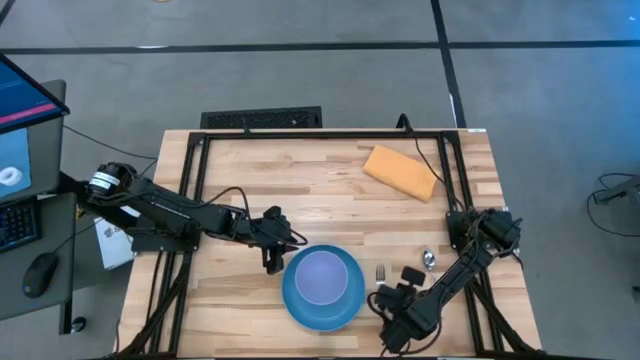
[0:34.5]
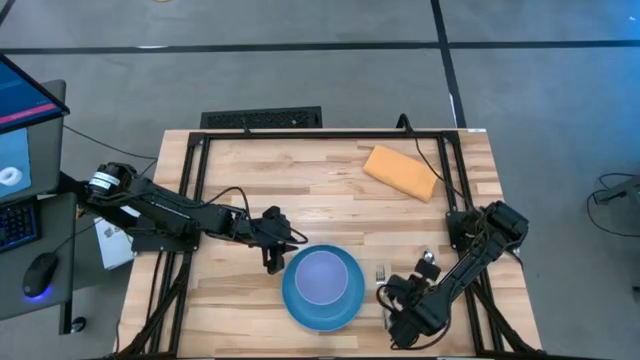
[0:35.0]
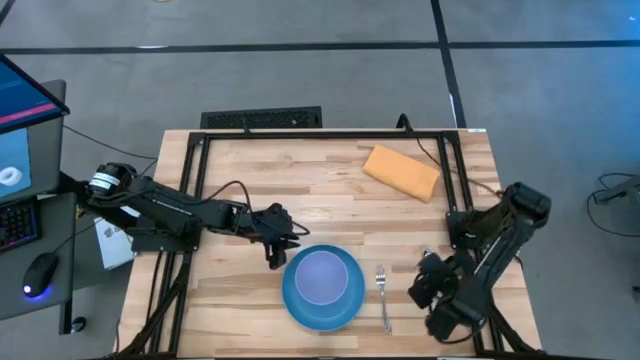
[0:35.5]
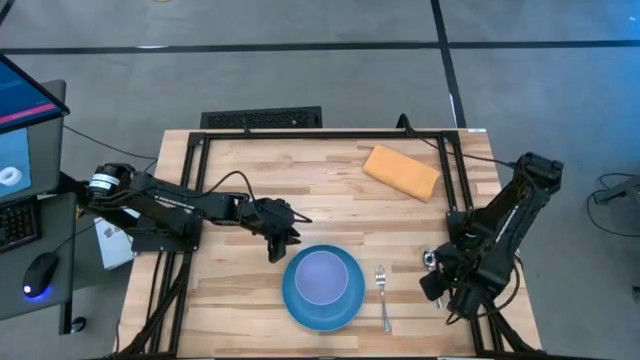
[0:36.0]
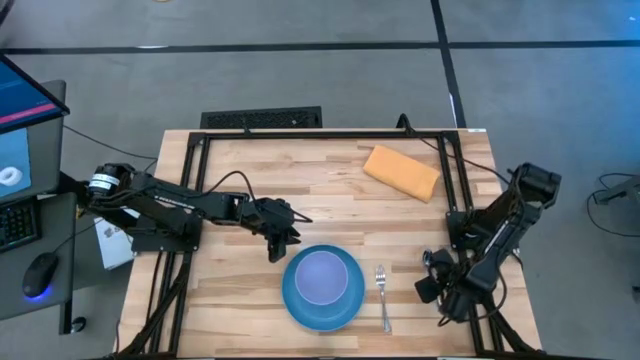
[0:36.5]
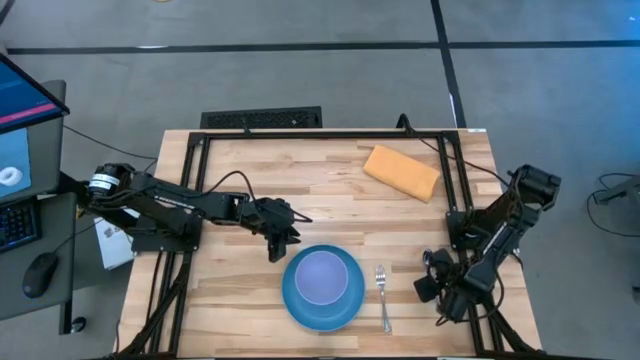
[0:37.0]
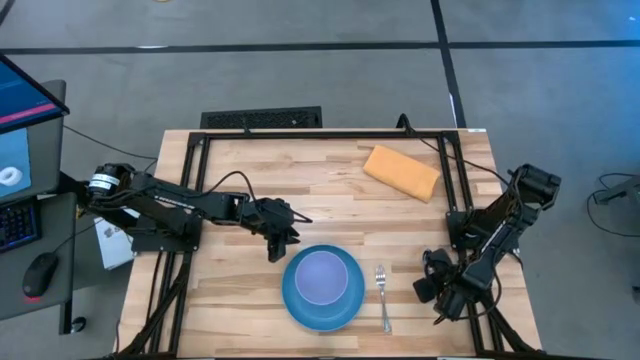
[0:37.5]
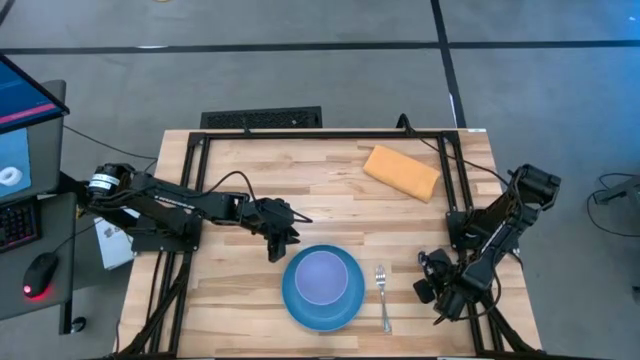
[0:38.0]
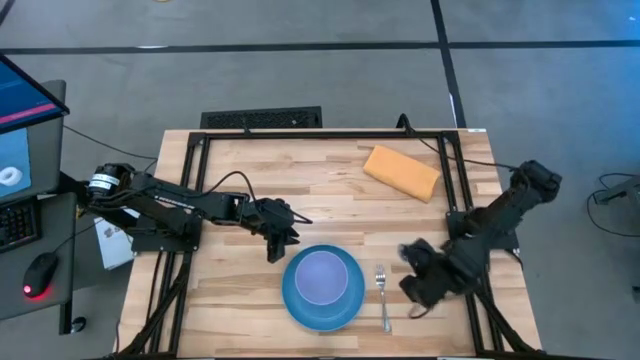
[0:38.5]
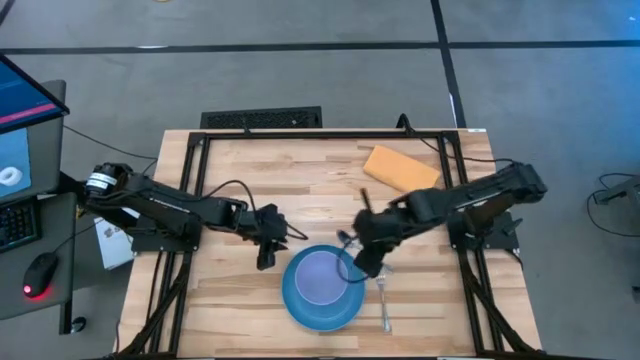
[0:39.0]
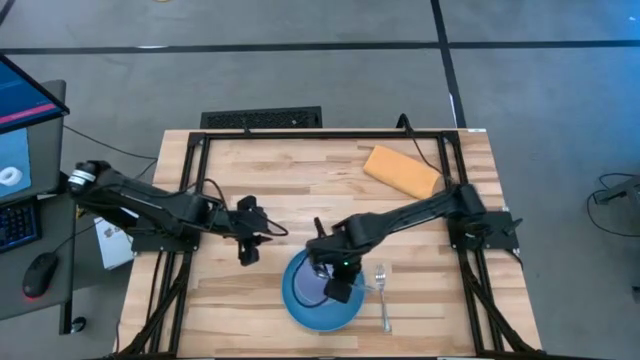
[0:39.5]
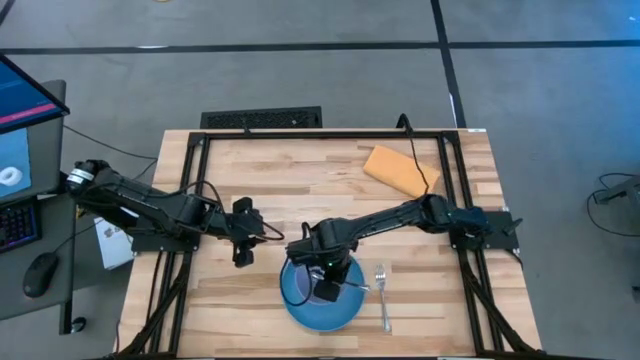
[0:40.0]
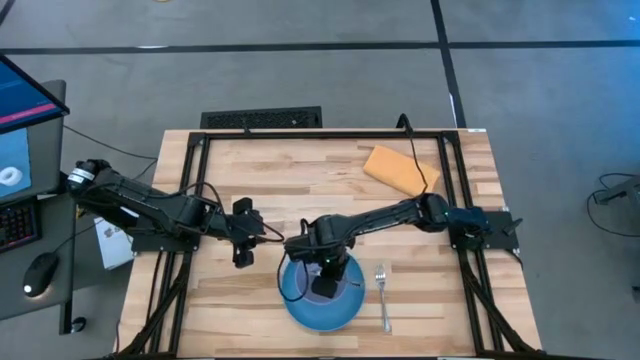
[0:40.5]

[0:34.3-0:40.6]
Task: Set table place
Put the silver spoon into the purple bowl

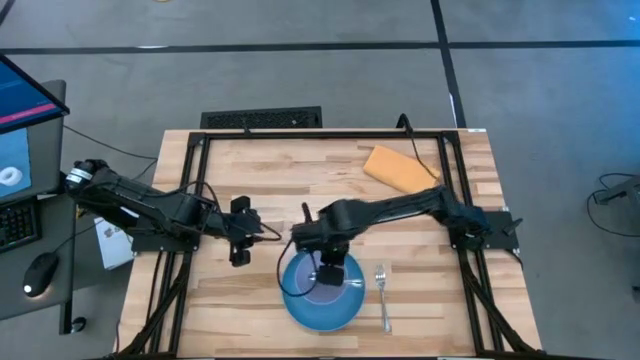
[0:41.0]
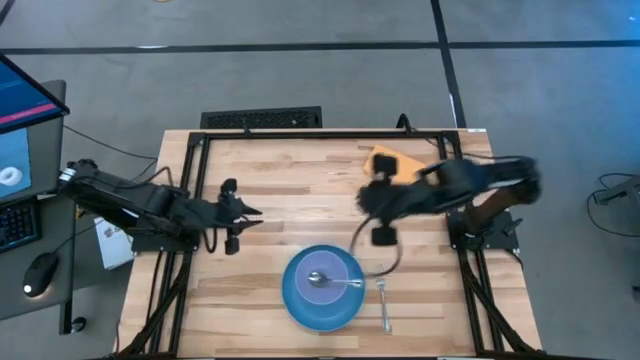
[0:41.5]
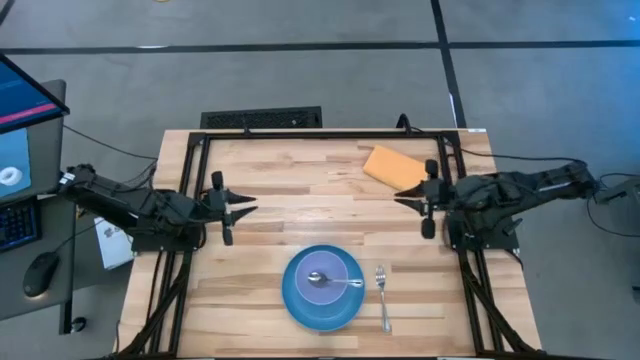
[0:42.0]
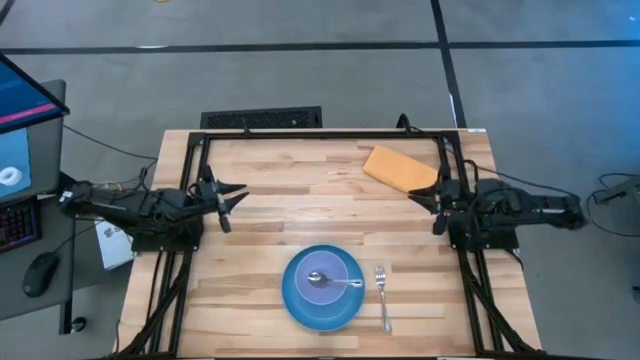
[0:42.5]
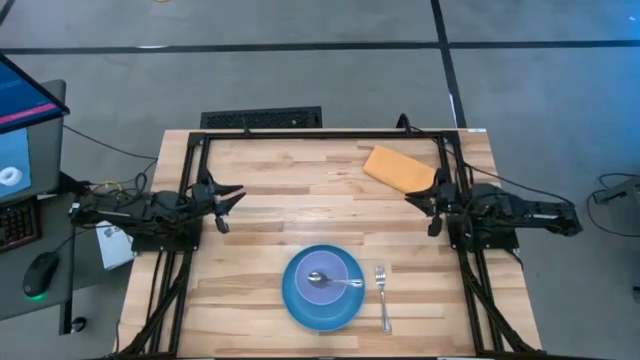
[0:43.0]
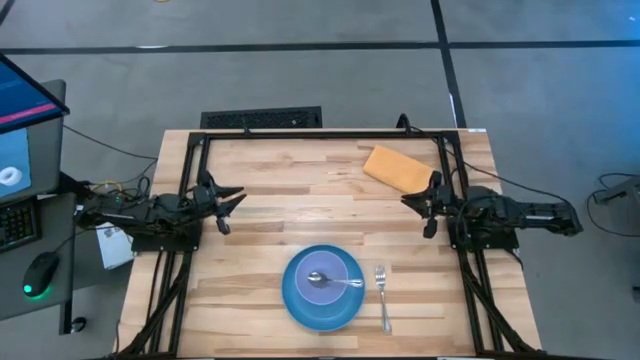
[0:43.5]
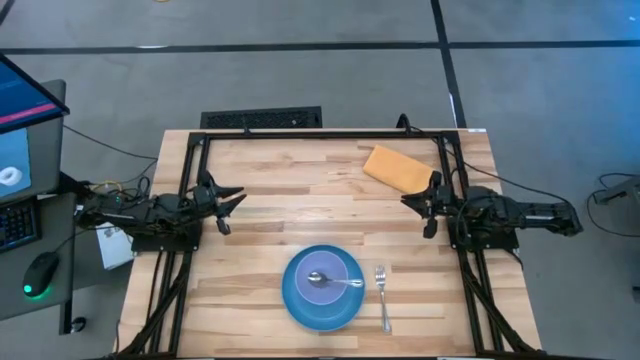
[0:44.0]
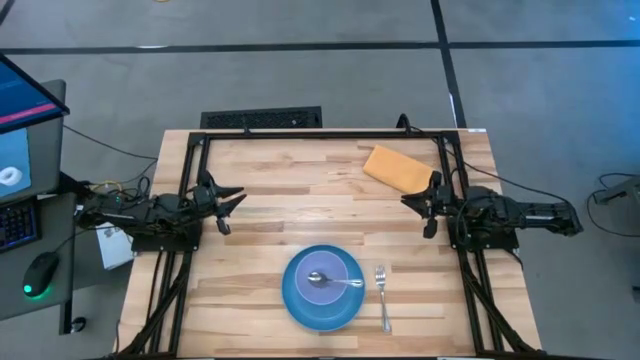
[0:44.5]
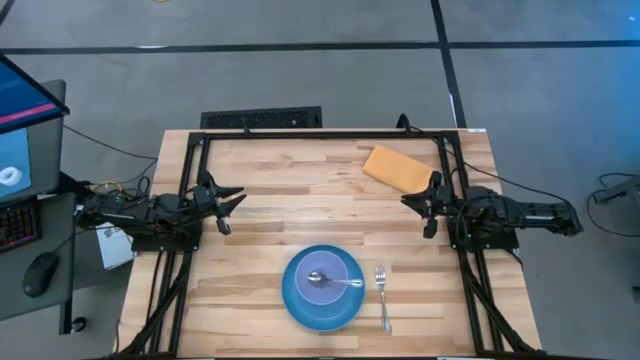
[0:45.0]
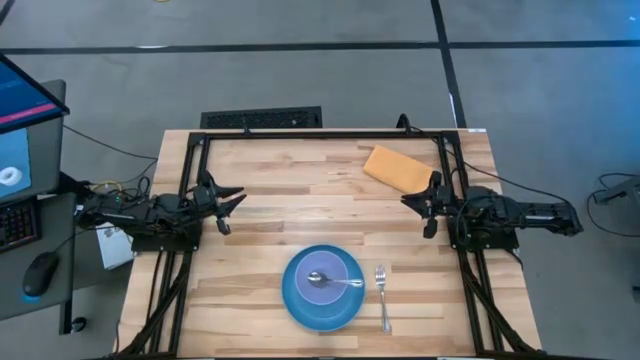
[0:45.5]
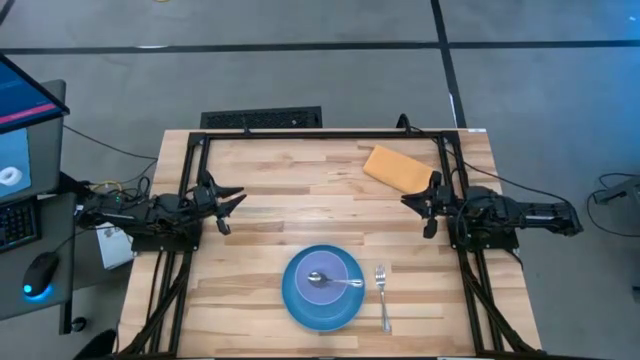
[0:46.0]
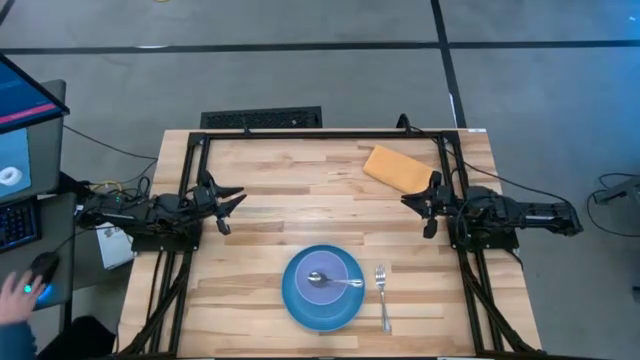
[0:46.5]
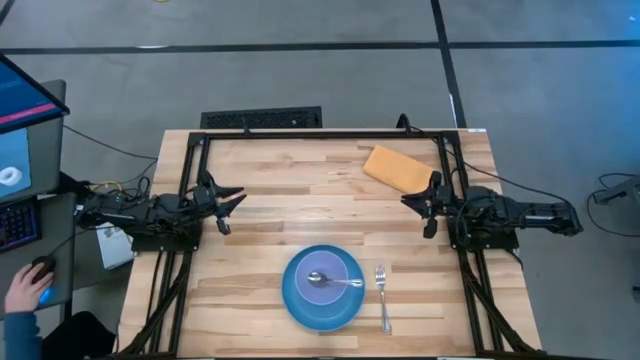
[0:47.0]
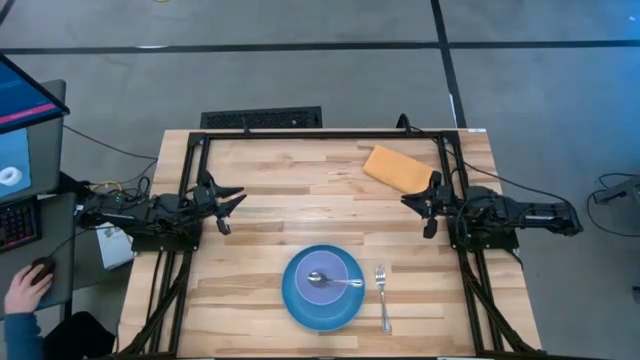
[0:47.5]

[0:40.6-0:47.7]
Return to Home Position

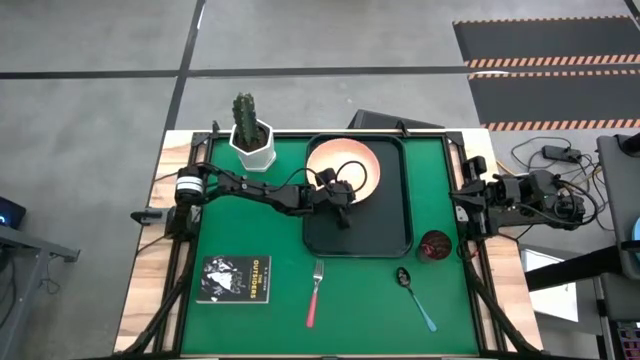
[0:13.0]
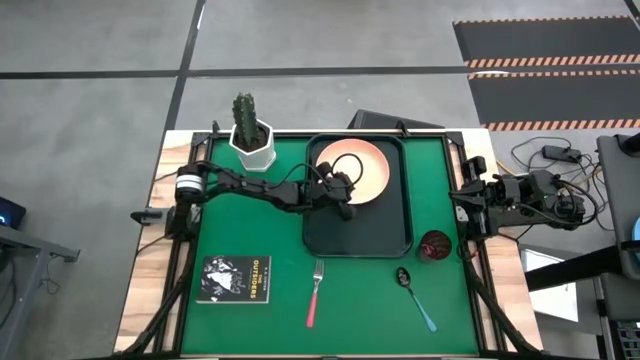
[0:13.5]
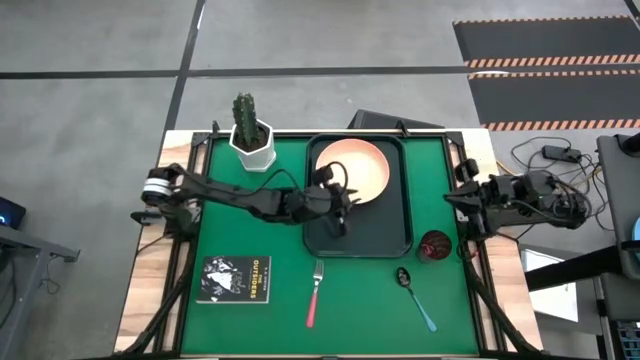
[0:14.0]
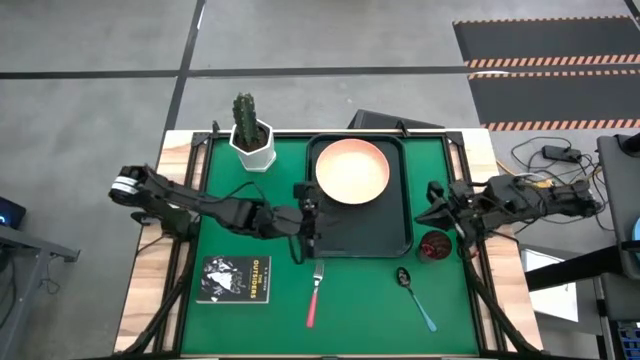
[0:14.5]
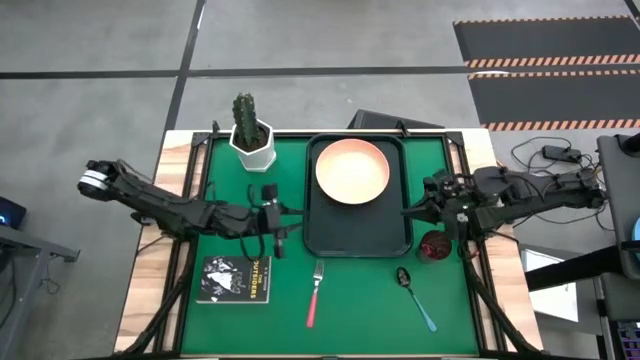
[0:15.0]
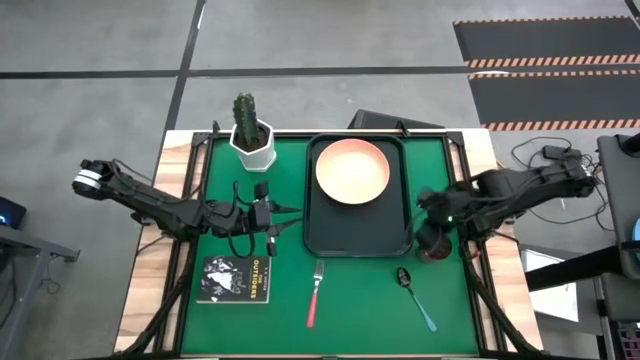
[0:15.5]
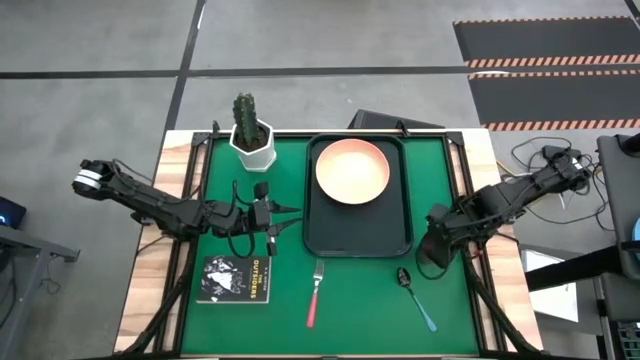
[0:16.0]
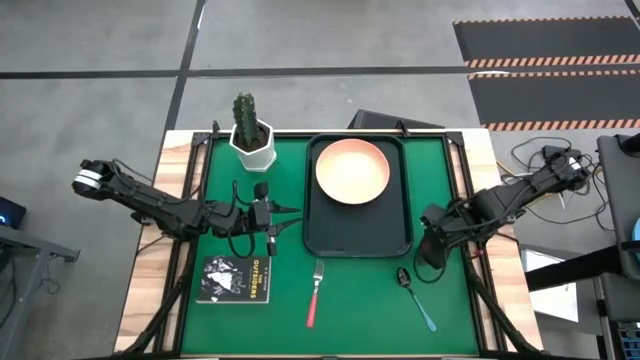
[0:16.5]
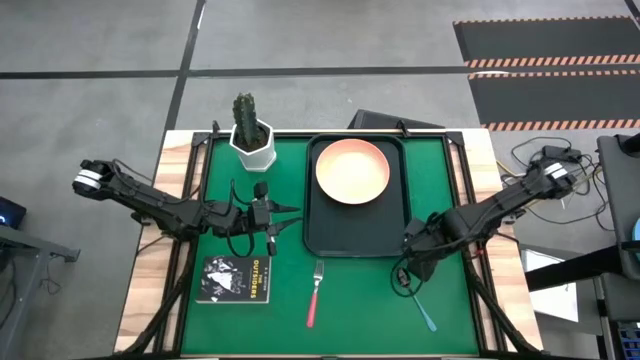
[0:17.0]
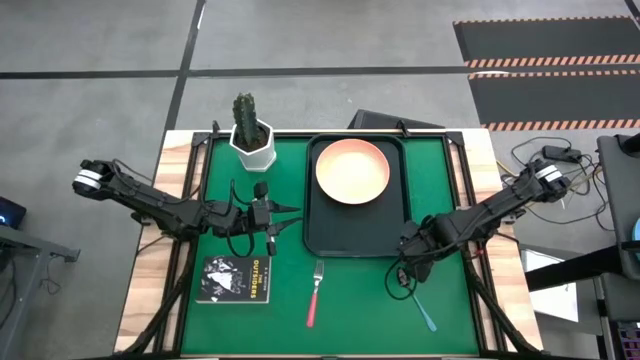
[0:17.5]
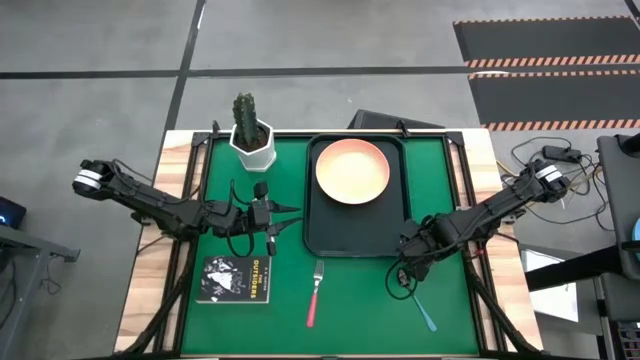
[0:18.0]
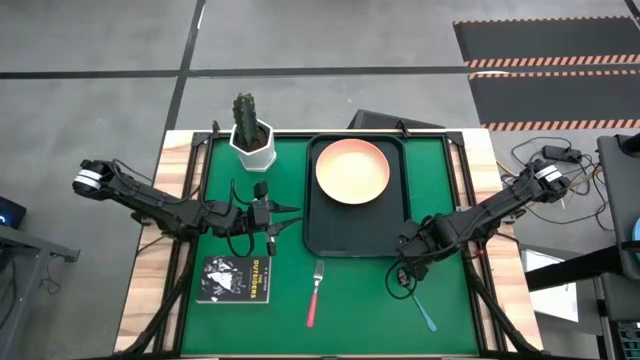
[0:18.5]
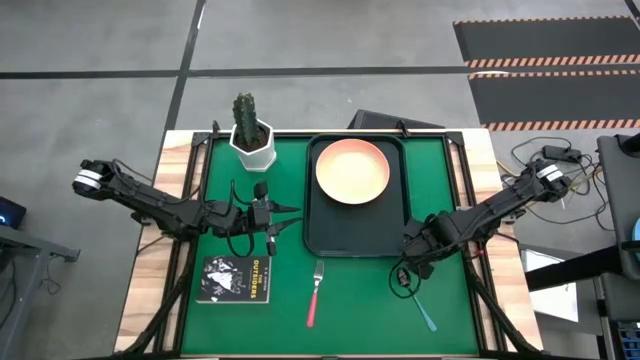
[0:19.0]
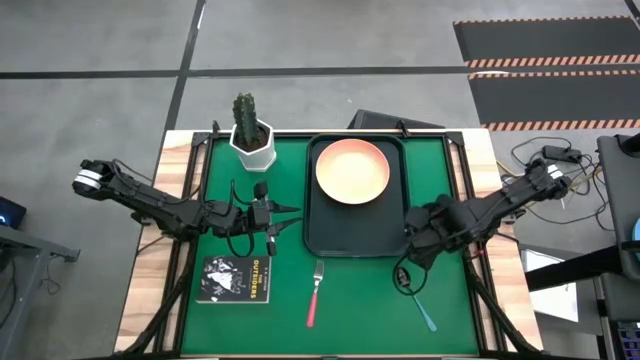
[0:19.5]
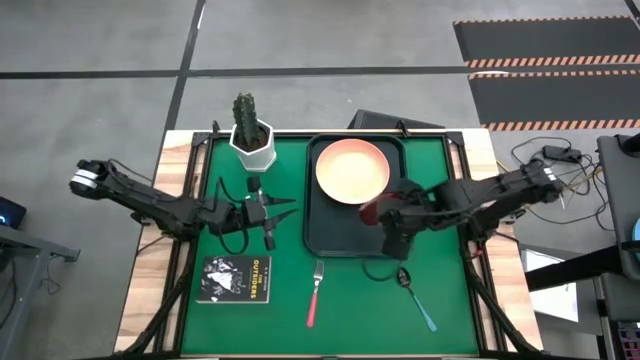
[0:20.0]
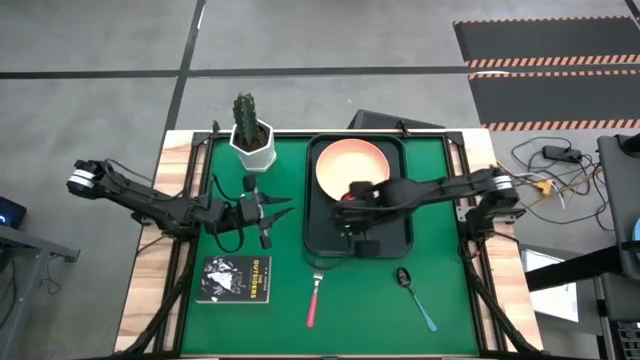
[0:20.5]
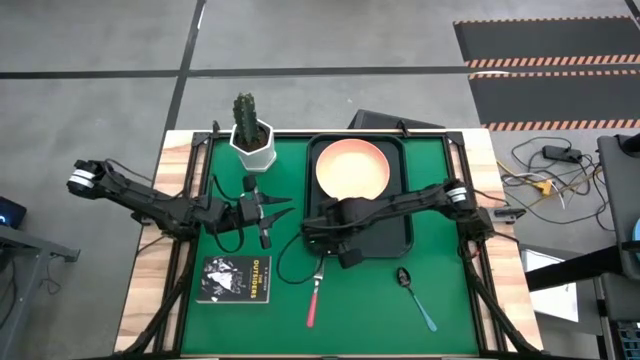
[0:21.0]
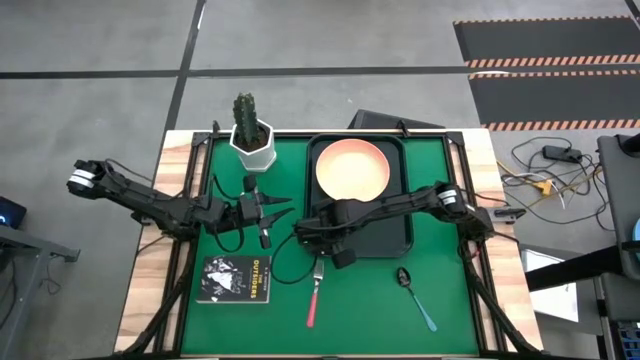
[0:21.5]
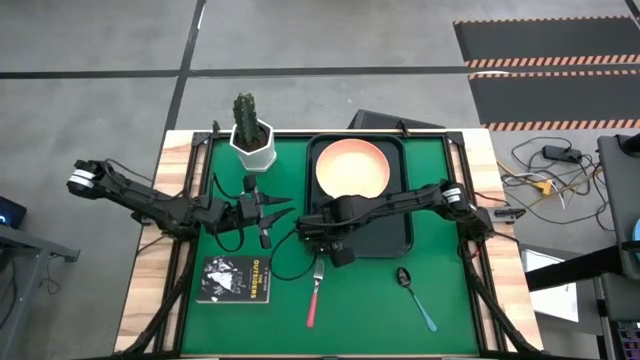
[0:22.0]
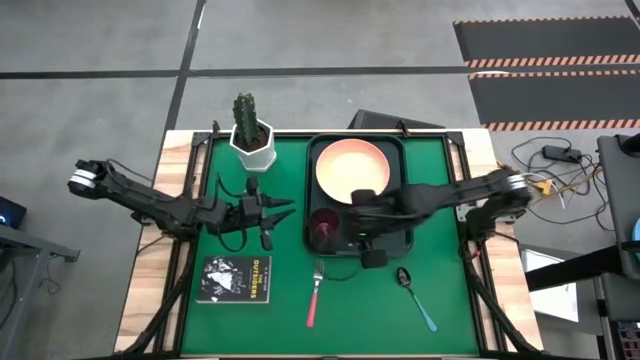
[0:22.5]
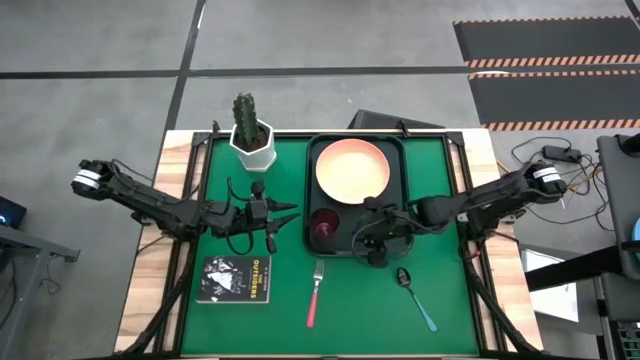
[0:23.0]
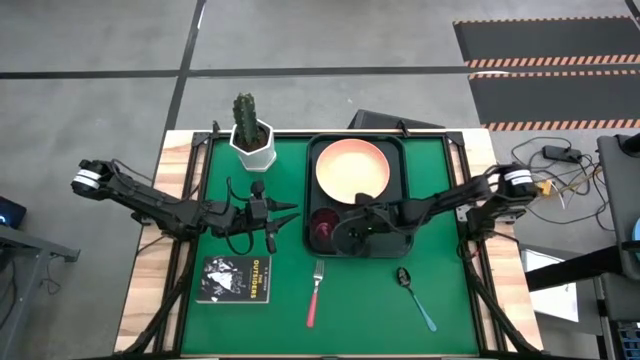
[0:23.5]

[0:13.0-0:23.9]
Task: Pick and place plate/cup/fork/spoon on tray
Put the red cup on the black serving tray to the top left of the light orange plate
